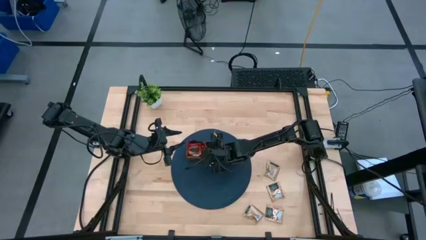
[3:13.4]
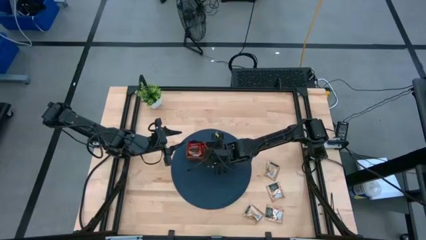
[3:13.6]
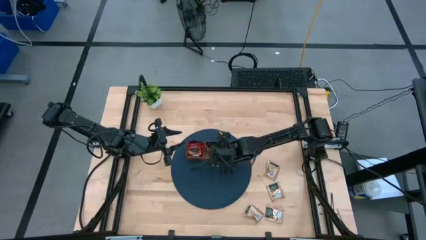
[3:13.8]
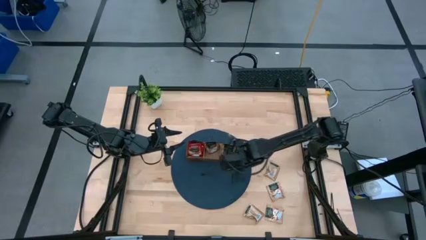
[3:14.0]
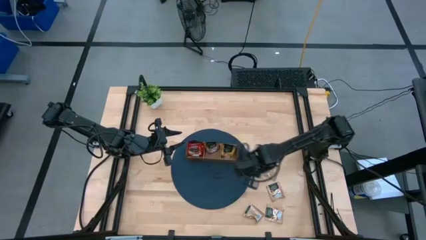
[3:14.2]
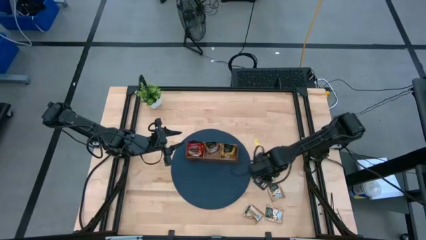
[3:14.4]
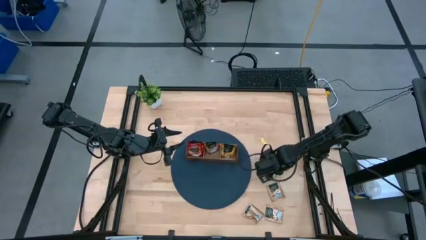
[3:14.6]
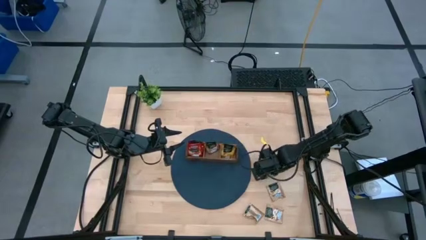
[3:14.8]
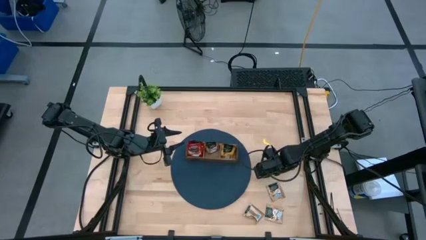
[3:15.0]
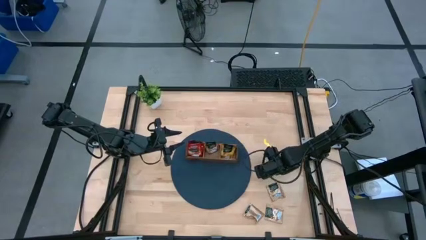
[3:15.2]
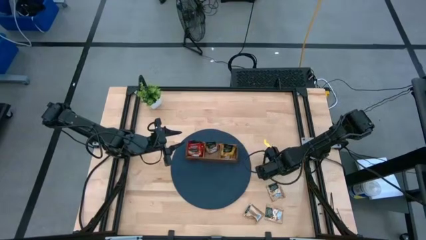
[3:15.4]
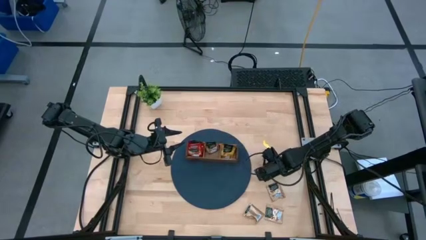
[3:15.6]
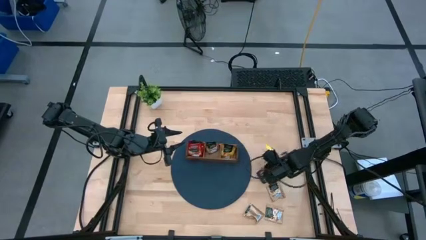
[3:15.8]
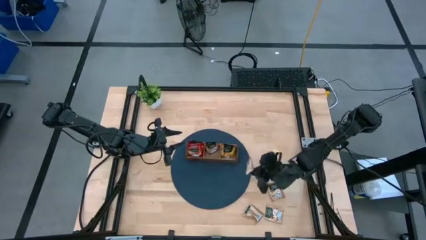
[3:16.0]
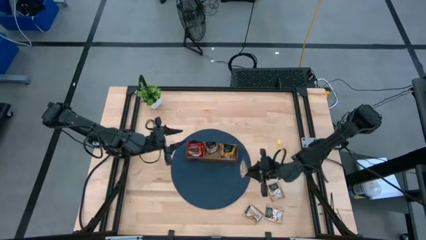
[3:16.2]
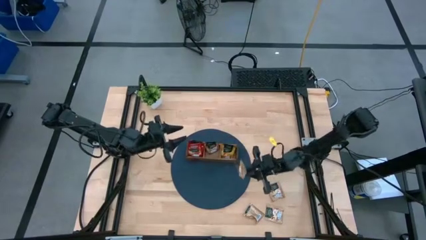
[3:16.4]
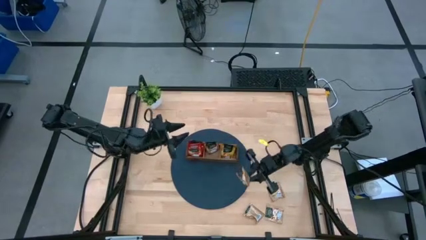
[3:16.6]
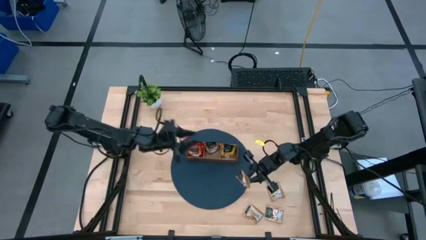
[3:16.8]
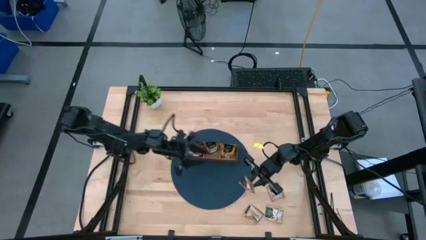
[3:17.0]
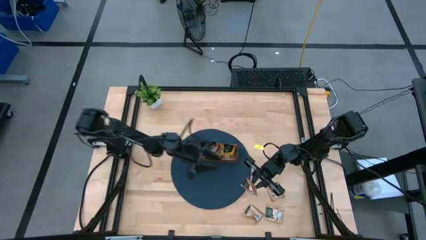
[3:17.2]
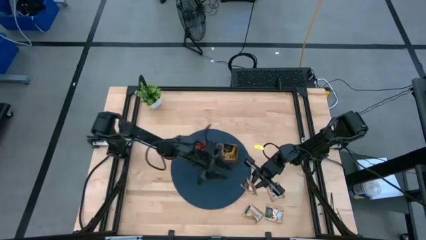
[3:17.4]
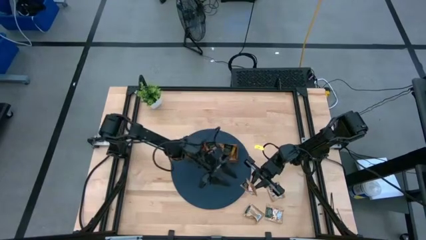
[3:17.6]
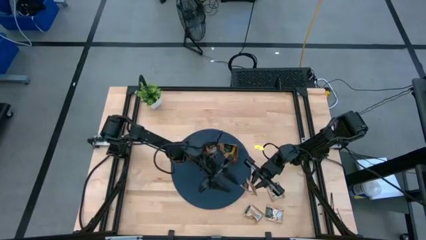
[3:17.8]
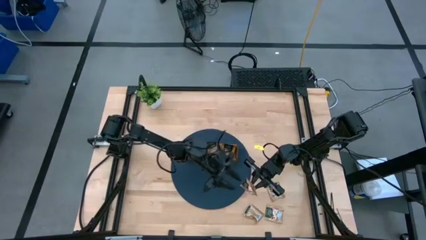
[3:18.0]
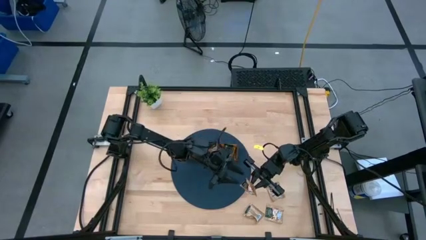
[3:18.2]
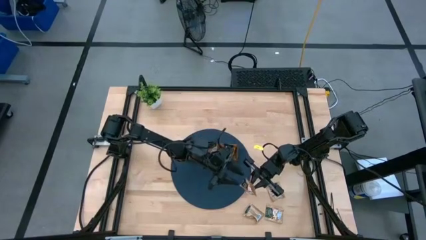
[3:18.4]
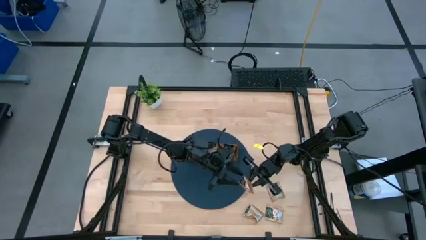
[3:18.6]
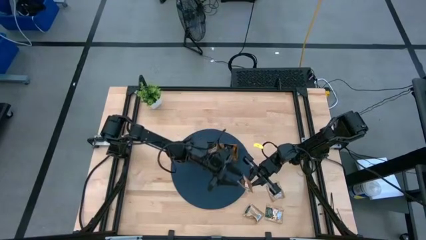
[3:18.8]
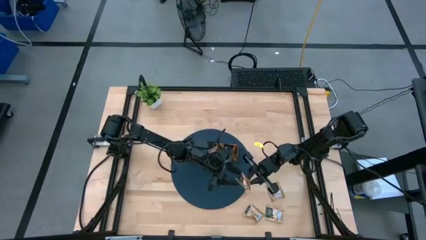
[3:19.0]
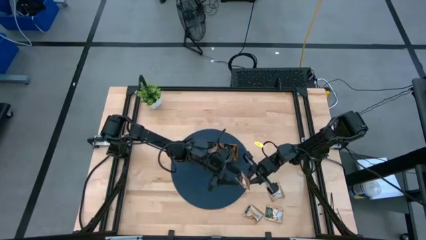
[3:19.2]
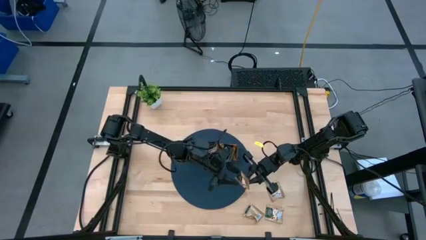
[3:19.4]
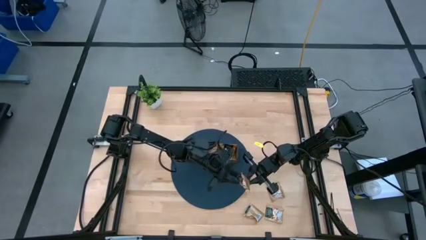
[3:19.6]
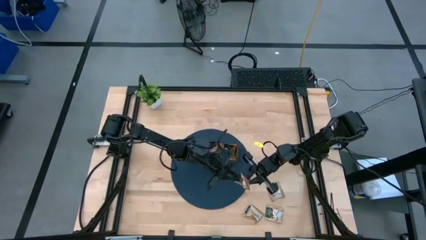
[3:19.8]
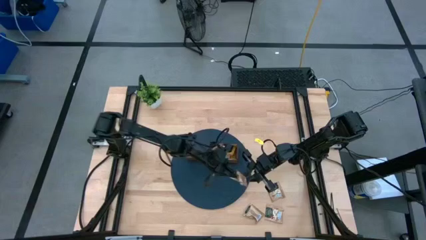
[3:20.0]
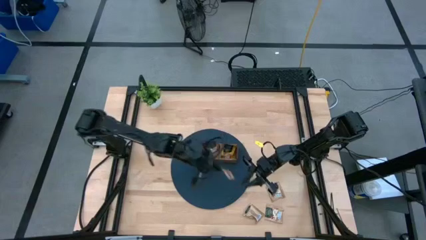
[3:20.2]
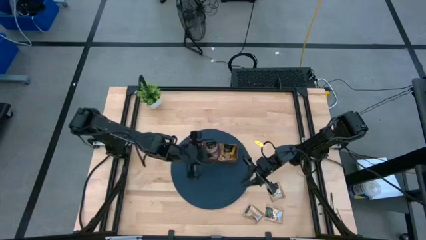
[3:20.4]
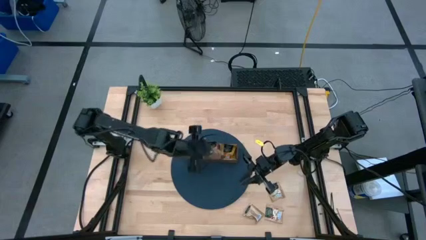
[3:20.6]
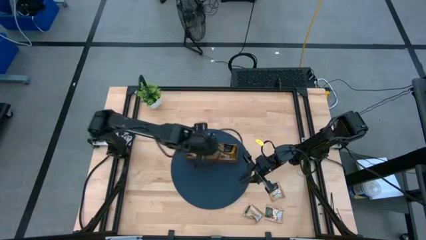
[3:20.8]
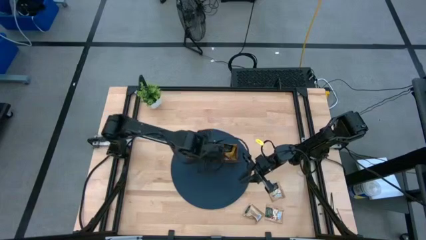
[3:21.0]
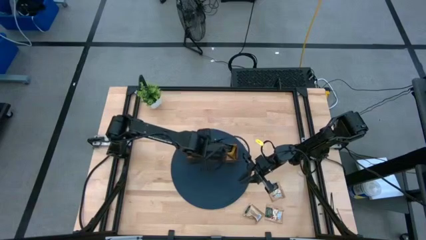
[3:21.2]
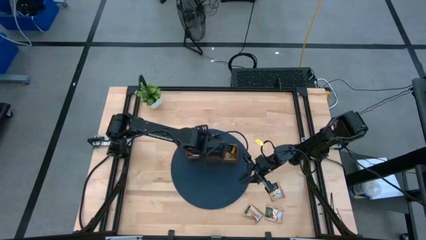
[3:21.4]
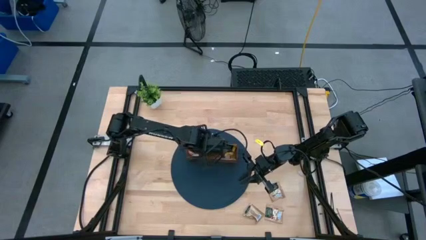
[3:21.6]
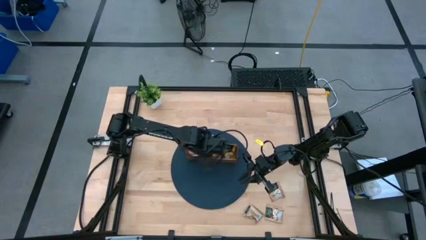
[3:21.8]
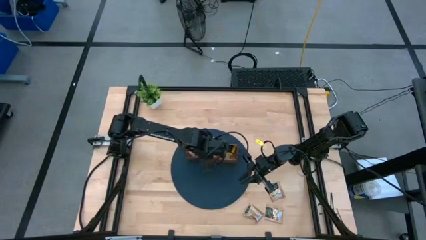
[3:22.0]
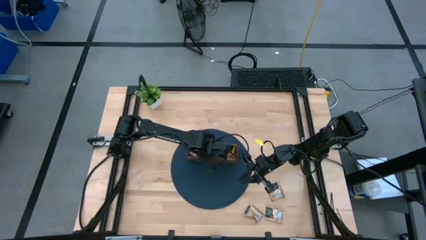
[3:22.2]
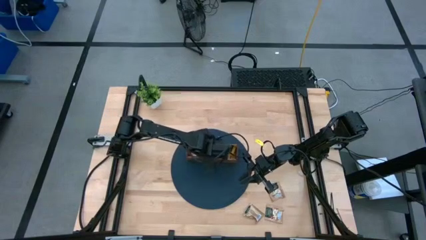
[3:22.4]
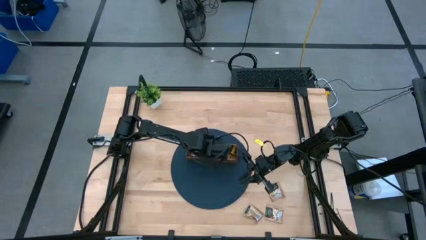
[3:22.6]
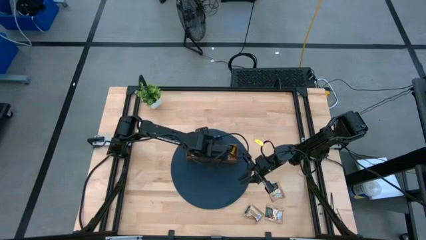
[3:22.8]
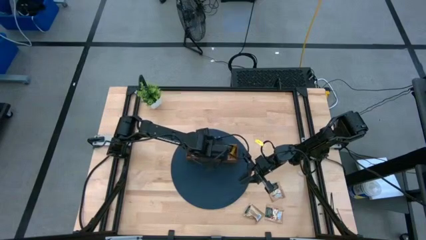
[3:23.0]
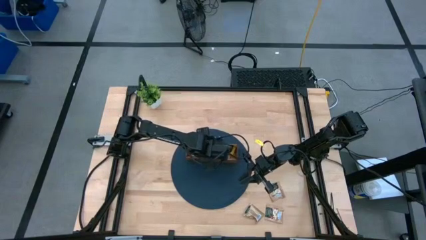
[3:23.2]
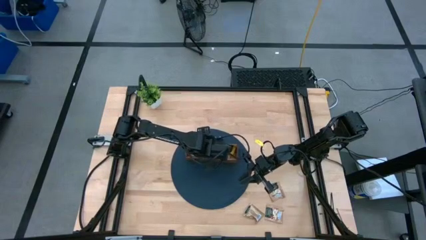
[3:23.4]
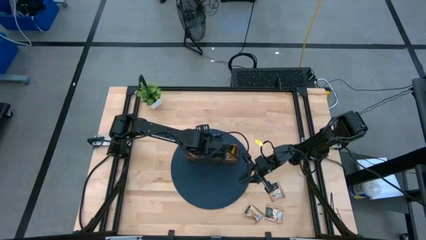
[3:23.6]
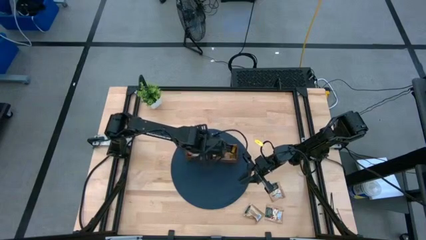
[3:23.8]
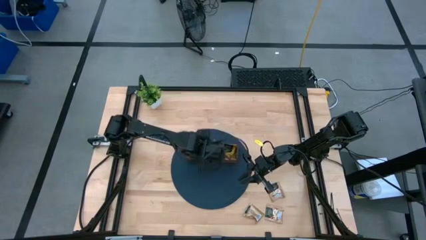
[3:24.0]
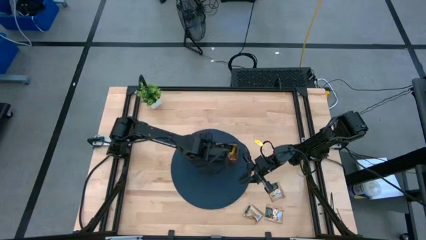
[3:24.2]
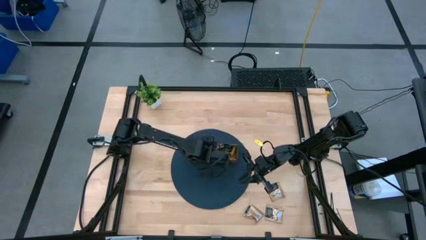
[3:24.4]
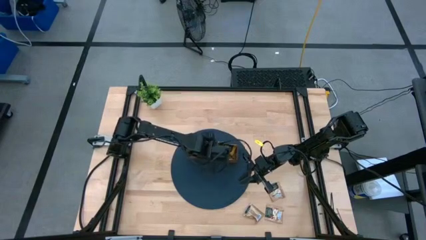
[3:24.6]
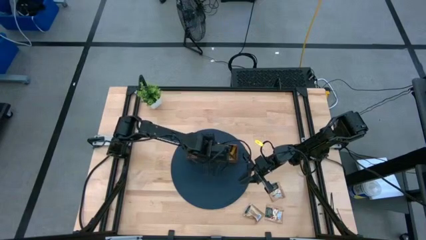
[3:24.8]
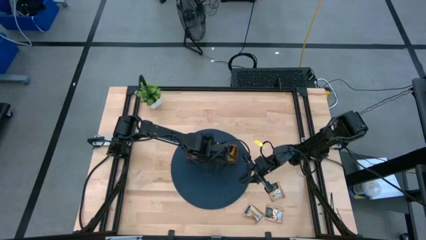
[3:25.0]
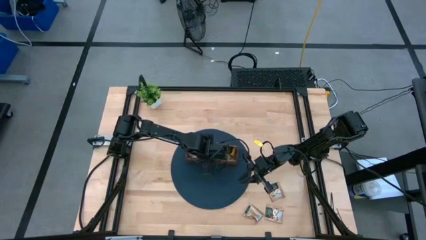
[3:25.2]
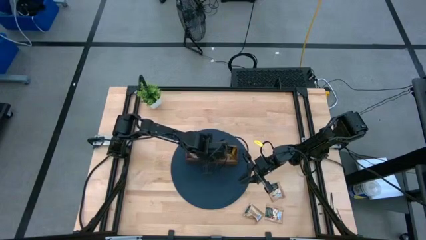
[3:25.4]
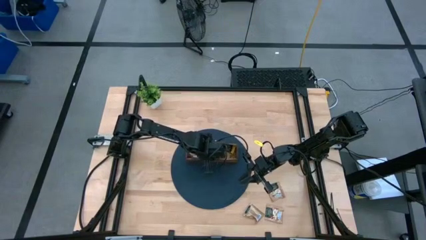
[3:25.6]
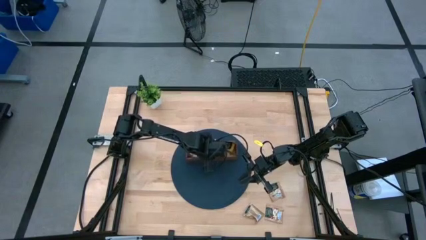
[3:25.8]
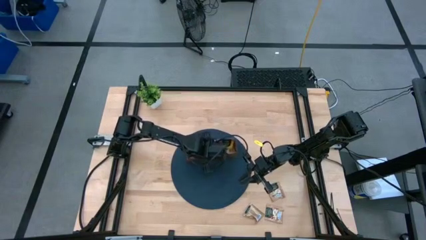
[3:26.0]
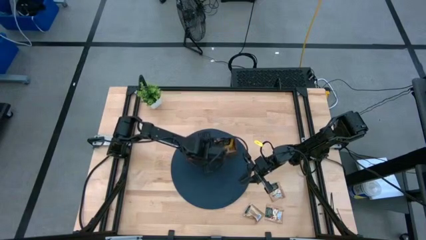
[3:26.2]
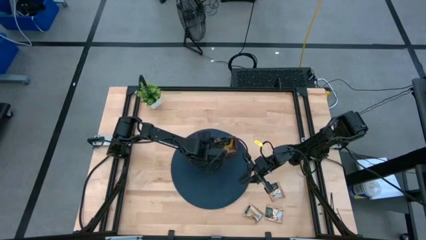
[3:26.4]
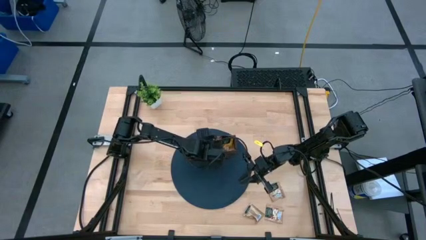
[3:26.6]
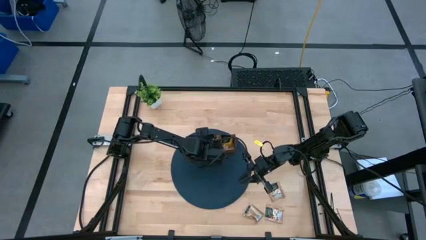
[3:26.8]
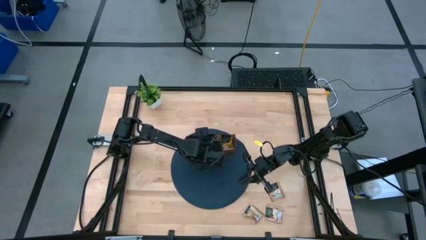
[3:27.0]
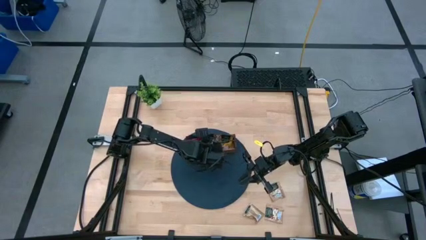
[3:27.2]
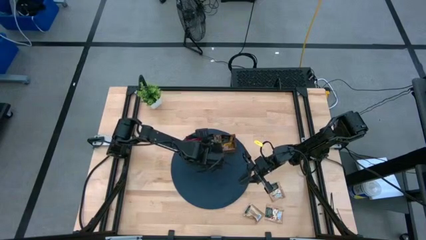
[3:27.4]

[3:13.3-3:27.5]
Task: Pick & Place Tea
Put the brown tea bag into the middle section of the wooden organizer
